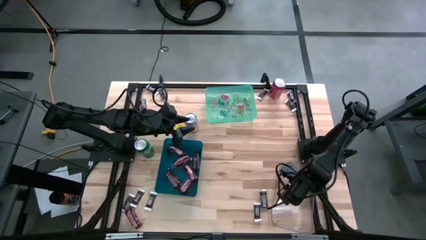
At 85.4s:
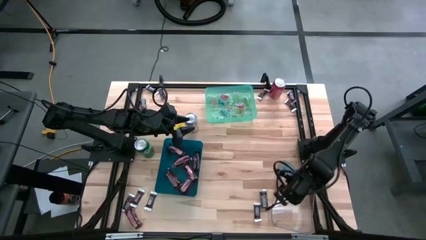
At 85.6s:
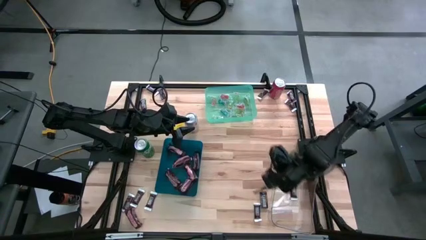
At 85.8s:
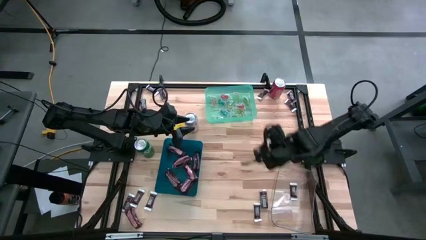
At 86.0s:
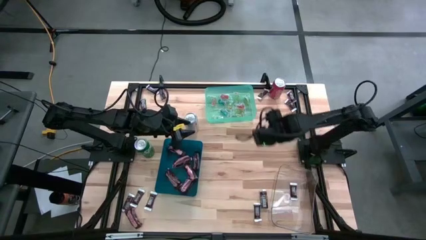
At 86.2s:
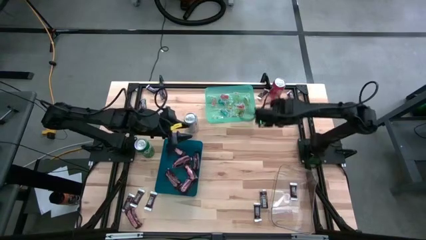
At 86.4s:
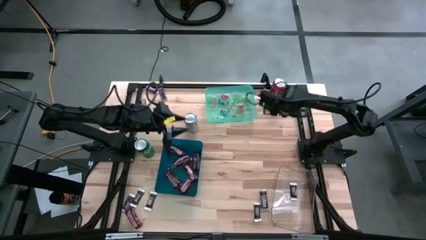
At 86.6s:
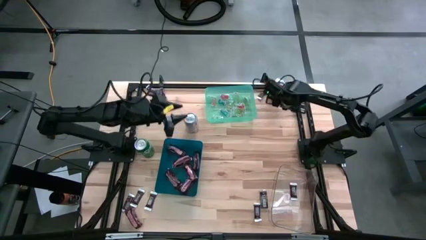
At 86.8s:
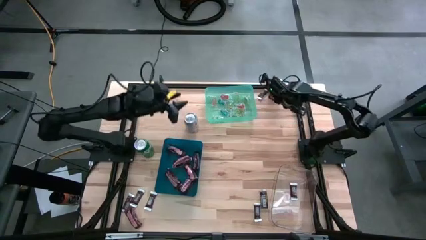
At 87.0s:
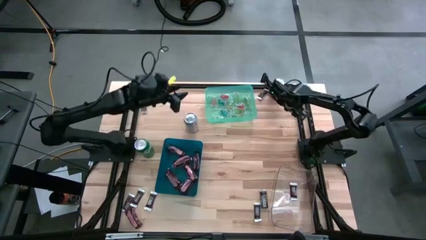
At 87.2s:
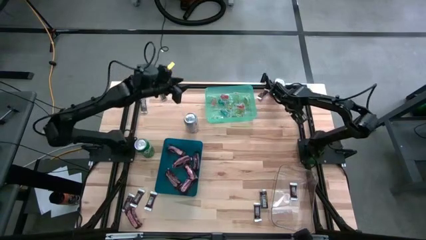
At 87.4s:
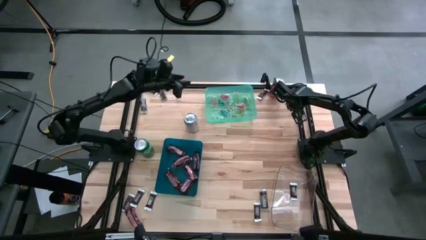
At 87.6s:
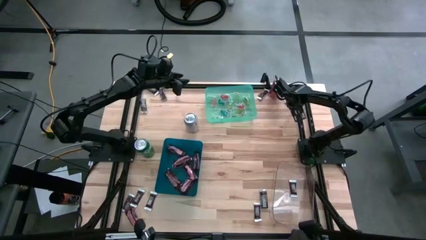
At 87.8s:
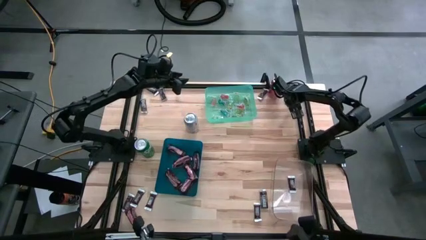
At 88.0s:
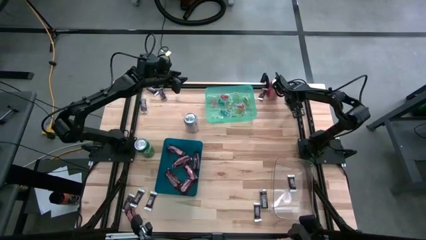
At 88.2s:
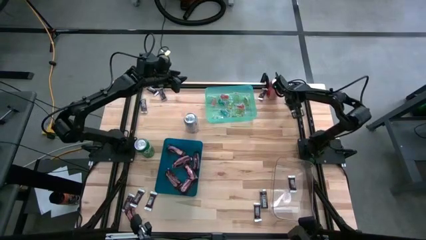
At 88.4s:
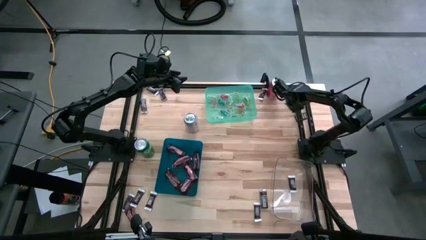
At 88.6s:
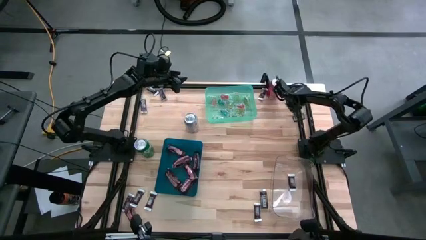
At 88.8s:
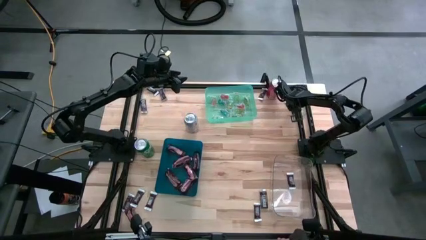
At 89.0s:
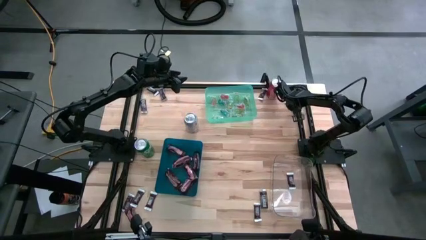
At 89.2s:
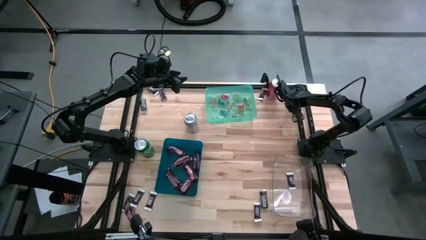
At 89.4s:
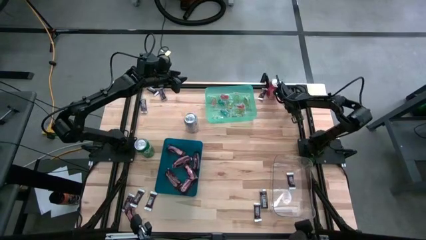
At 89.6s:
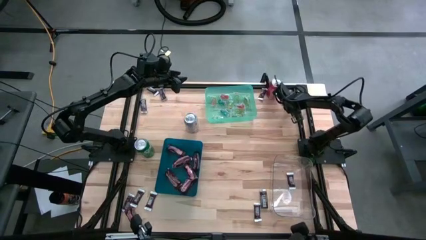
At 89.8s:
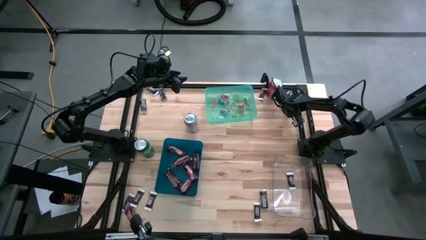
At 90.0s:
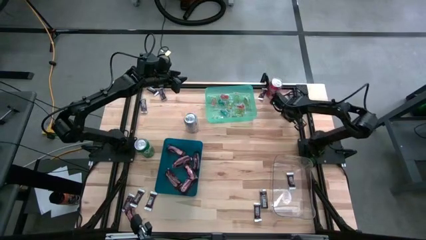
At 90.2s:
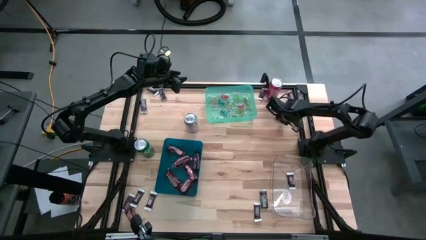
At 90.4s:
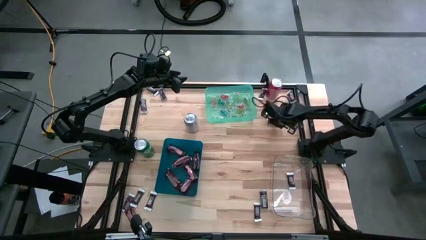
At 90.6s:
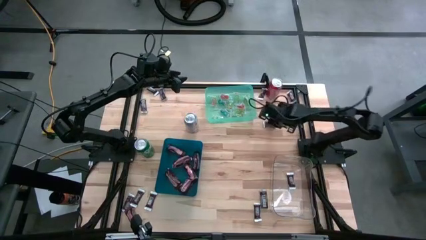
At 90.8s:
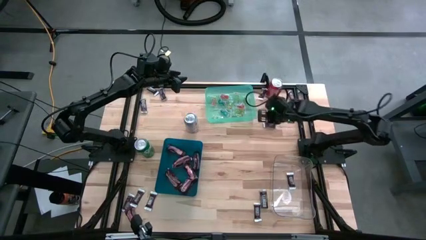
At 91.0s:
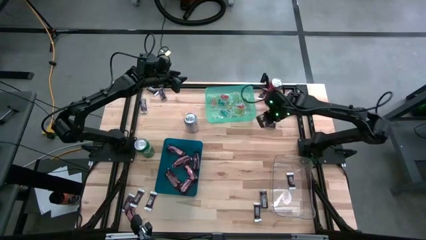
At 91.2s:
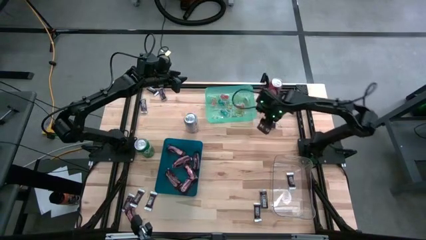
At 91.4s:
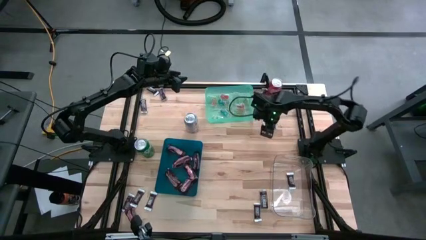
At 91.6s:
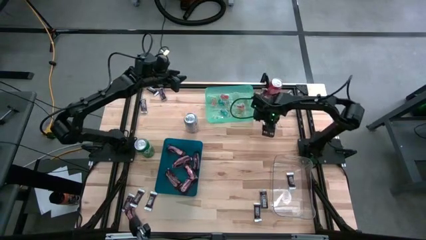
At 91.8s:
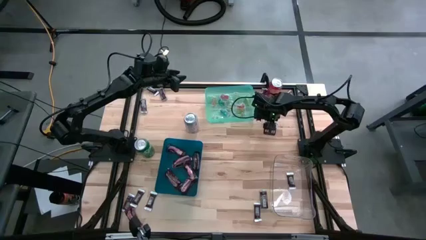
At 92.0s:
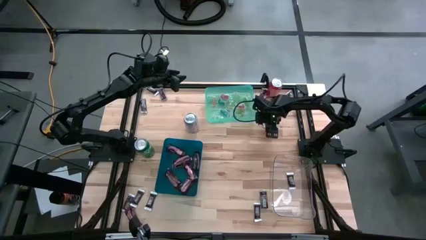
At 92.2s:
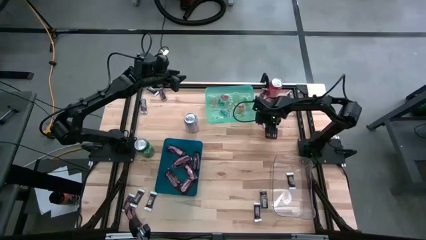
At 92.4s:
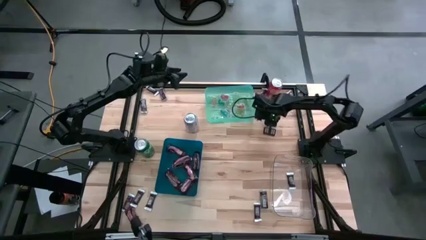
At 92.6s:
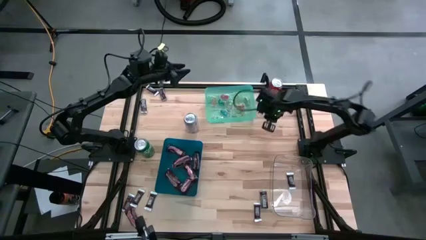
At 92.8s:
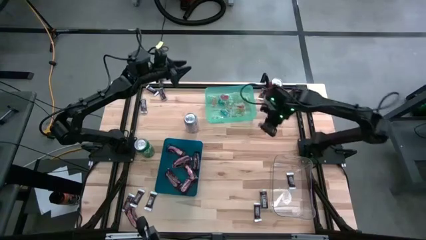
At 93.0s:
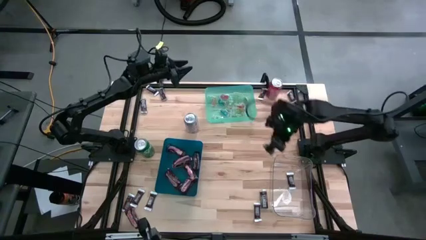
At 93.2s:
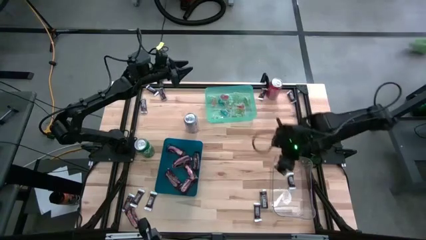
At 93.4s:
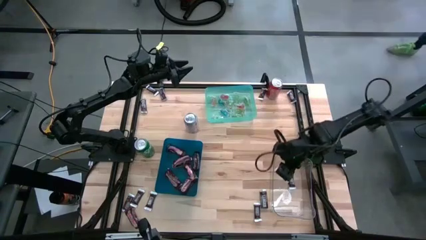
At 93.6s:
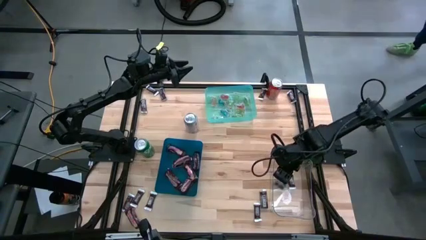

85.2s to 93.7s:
Task: Organize candy in baskets
Put the dark brown chocolate into the blue bin

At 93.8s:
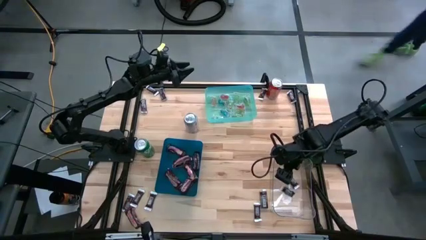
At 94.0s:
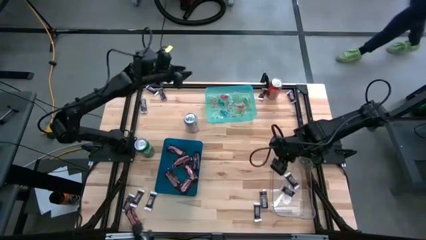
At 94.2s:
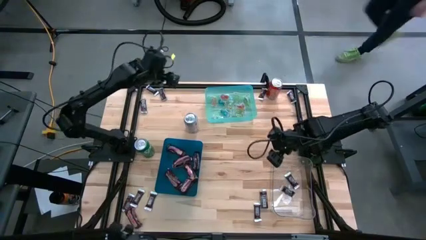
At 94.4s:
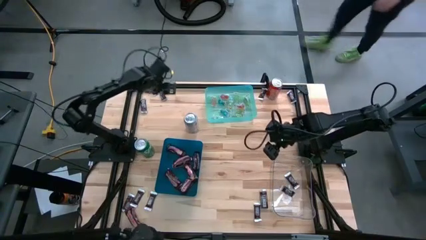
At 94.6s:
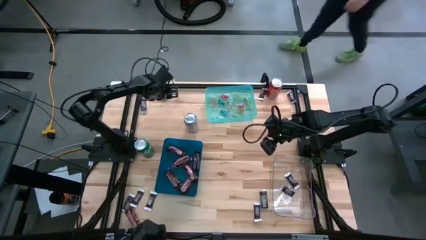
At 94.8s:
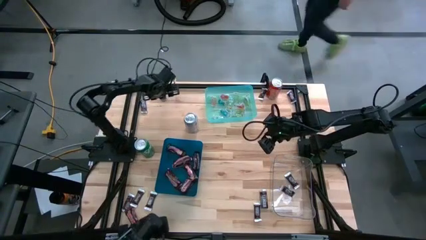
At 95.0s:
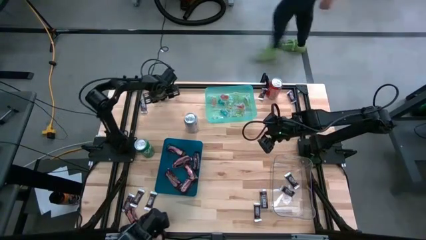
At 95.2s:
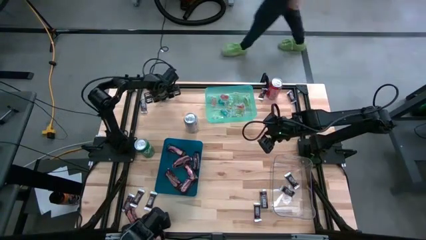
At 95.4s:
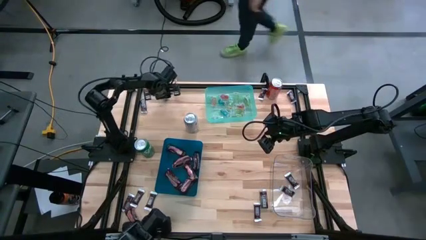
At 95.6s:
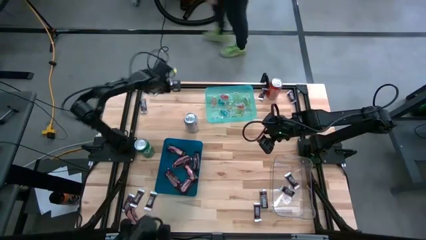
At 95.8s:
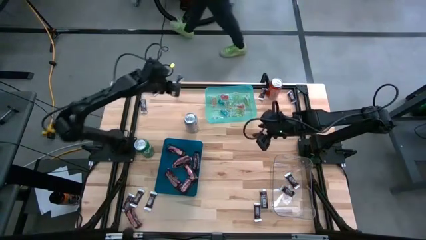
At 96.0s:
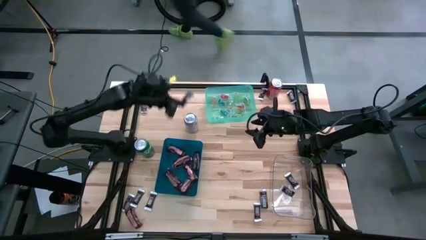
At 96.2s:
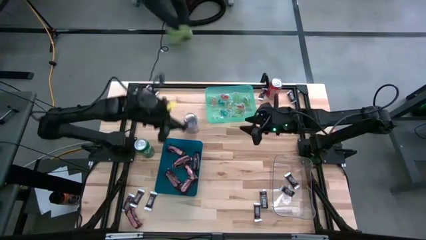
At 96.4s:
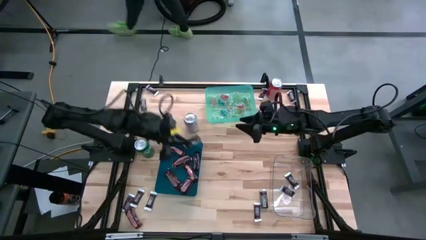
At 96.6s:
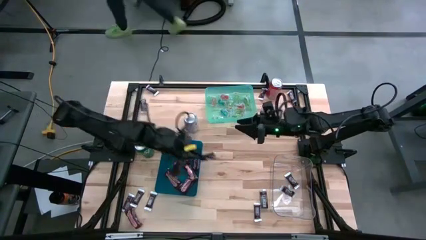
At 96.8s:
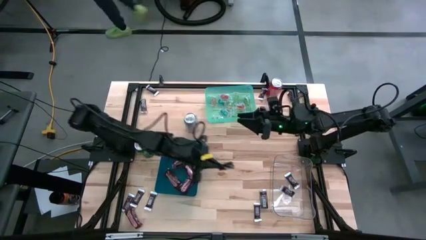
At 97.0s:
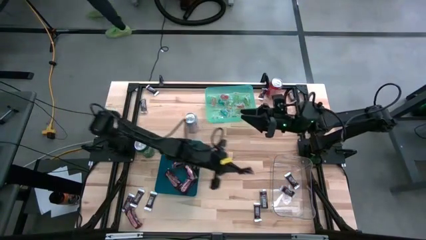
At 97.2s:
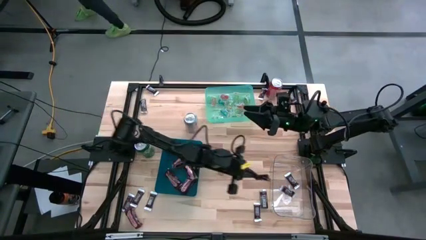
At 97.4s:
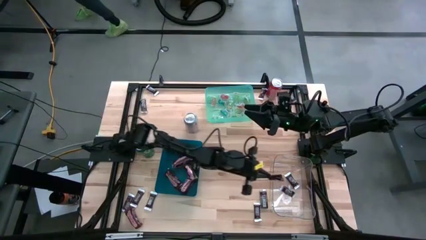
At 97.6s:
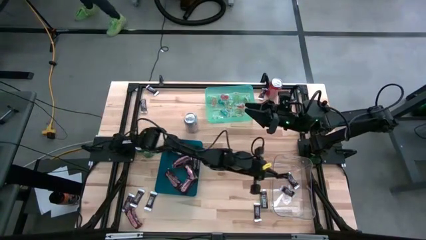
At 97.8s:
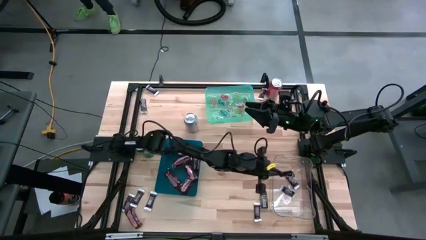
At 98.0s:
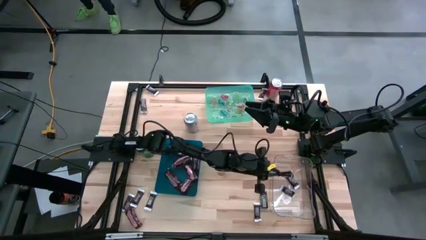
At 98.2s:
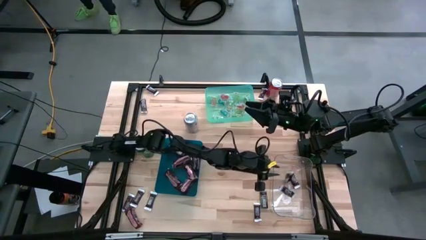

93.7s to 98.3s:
Put the dark brown chocolate bar into the transparent bin

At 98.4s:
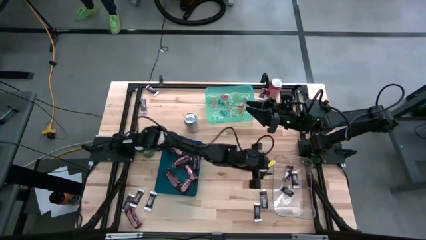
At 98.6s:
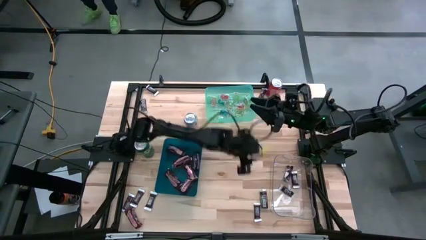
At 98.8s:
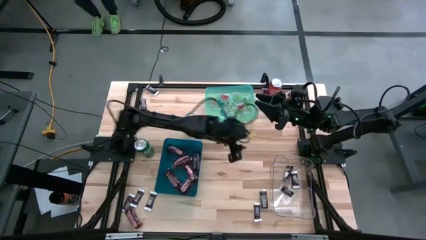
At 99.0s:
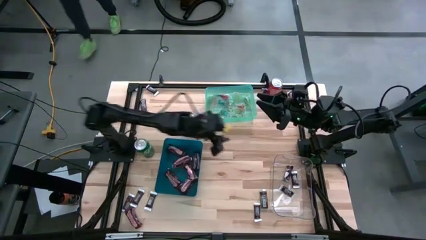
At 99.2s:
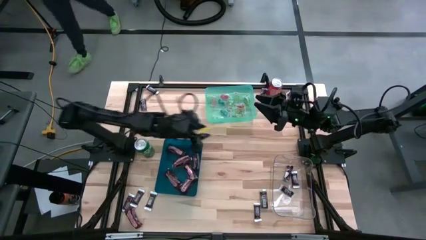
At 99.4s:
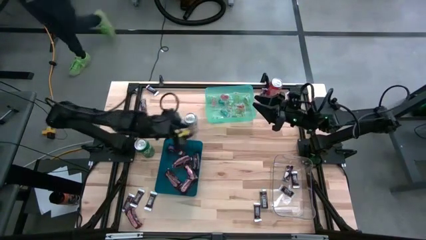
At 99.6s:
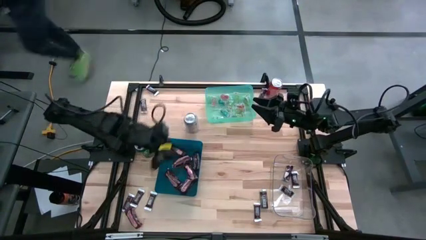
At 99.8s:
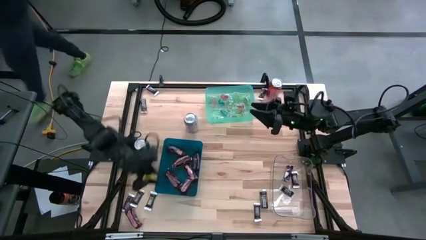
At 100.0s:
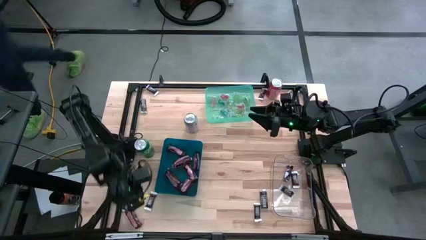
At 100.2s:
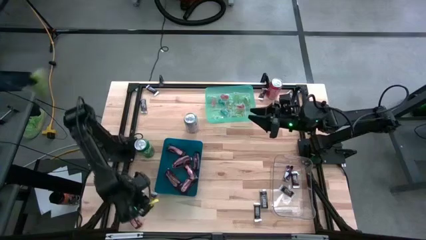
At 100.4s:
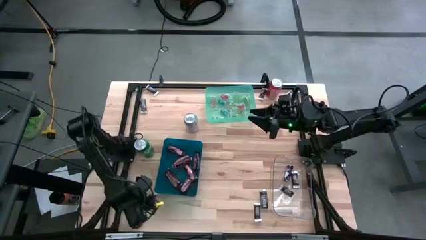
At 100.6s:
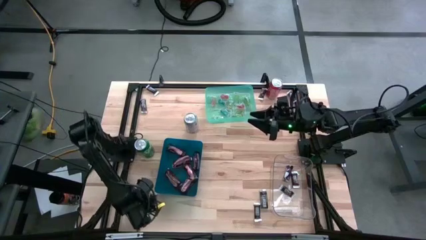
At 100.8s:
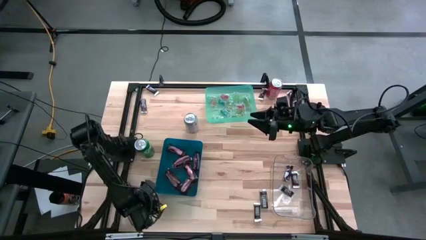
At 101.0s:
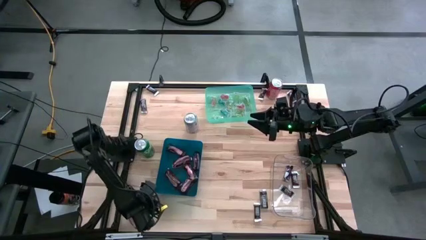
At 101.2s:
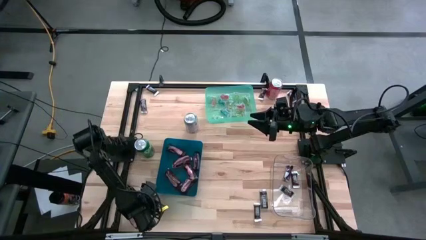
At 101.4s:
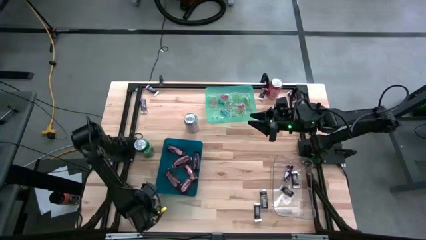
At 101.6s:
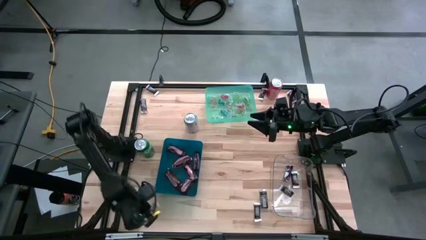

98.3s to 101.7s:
Put the dark brown chocolate bar into the transparent bin
